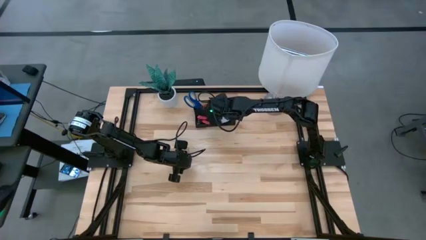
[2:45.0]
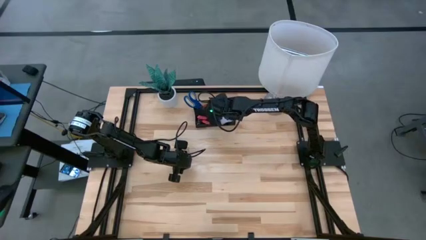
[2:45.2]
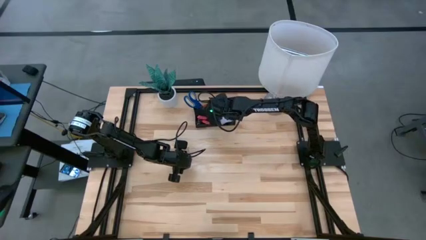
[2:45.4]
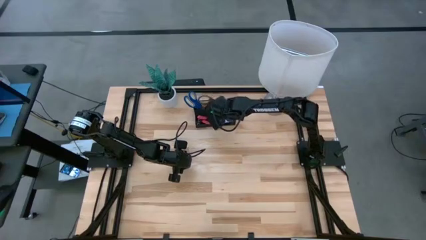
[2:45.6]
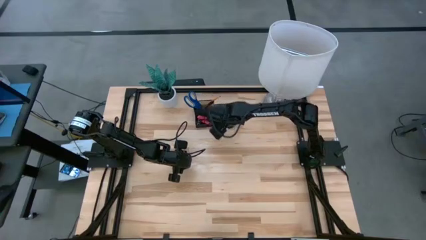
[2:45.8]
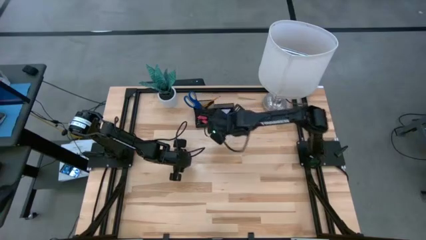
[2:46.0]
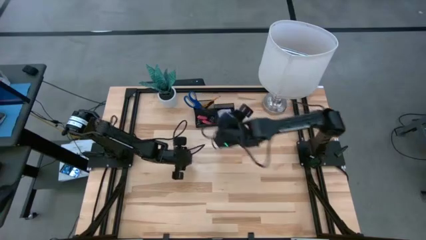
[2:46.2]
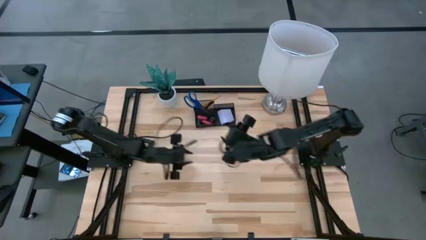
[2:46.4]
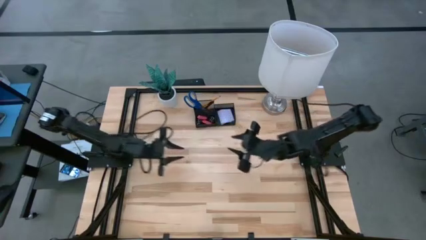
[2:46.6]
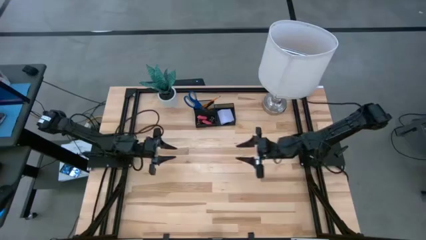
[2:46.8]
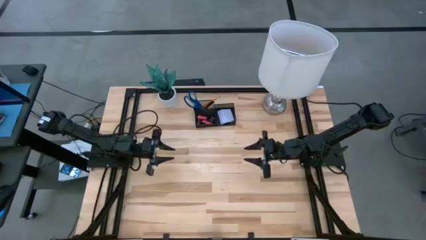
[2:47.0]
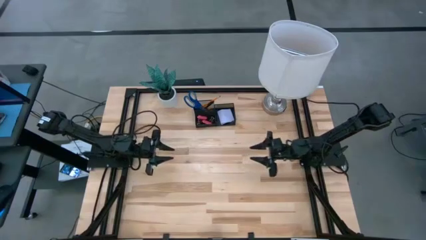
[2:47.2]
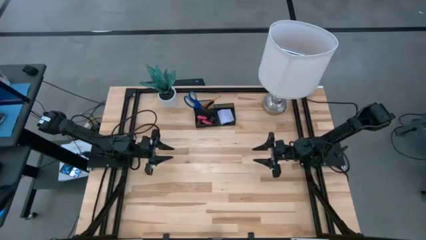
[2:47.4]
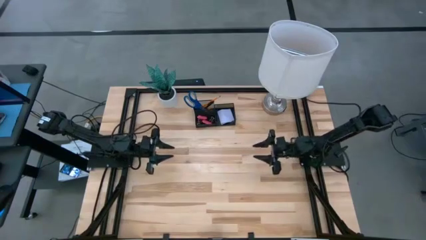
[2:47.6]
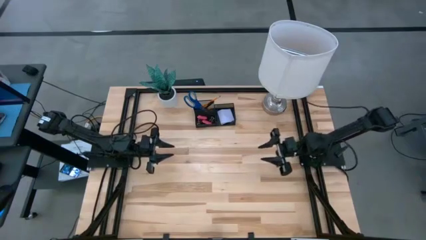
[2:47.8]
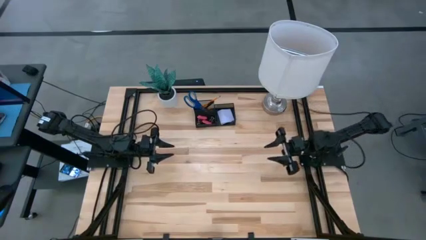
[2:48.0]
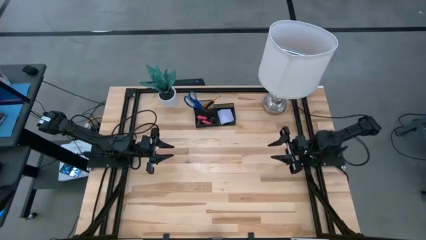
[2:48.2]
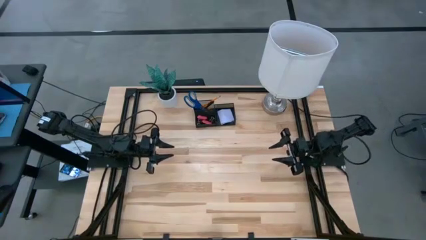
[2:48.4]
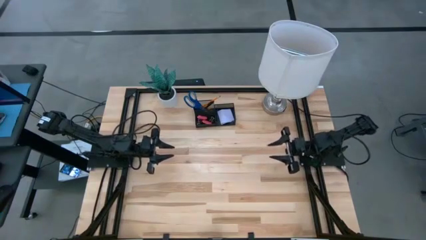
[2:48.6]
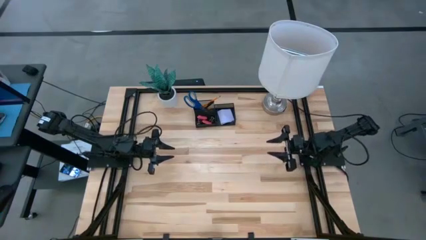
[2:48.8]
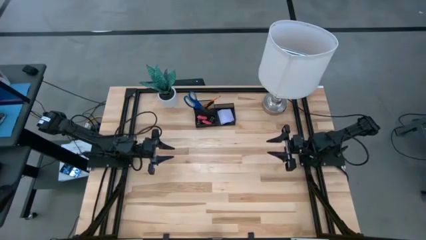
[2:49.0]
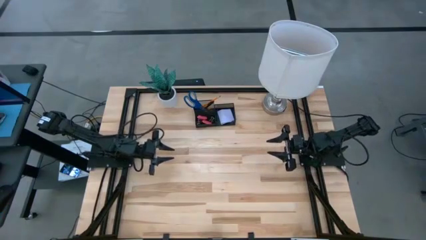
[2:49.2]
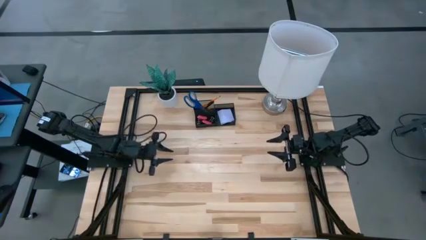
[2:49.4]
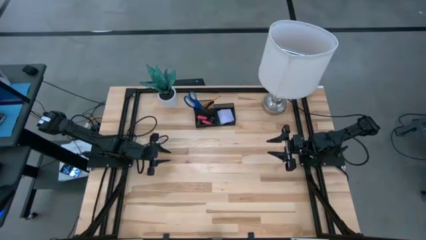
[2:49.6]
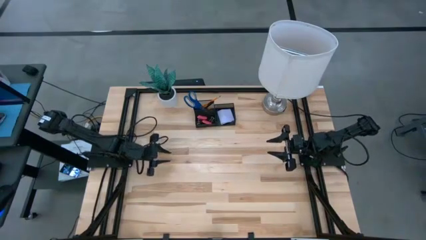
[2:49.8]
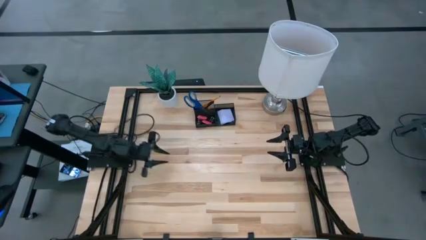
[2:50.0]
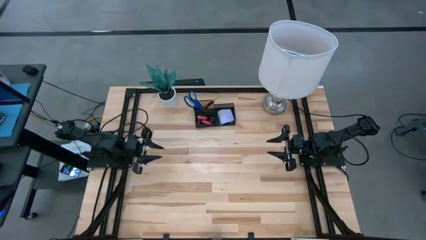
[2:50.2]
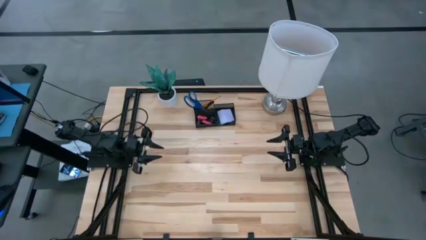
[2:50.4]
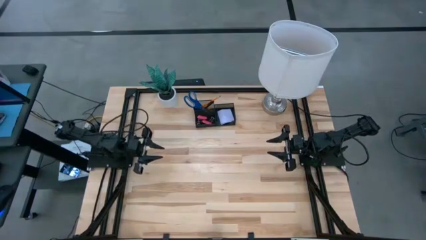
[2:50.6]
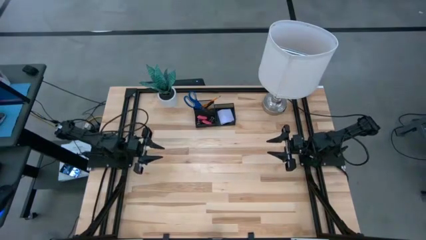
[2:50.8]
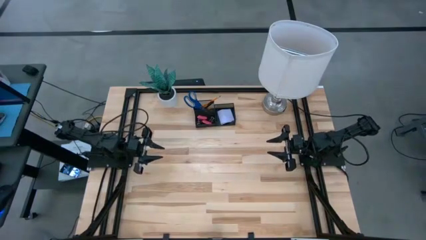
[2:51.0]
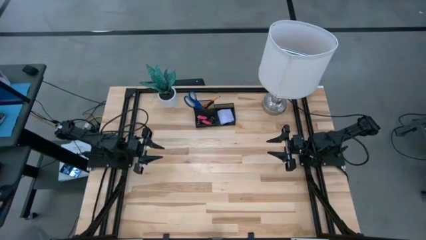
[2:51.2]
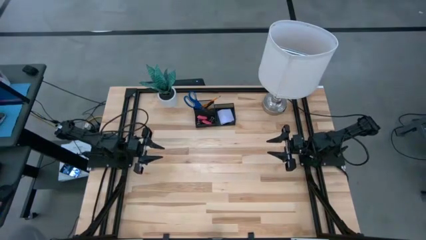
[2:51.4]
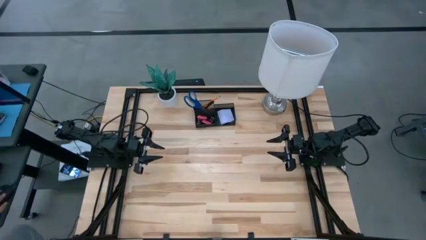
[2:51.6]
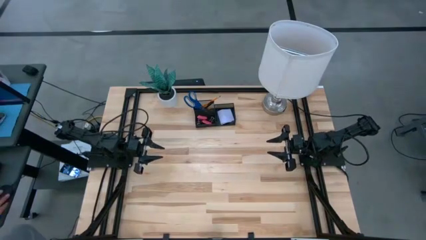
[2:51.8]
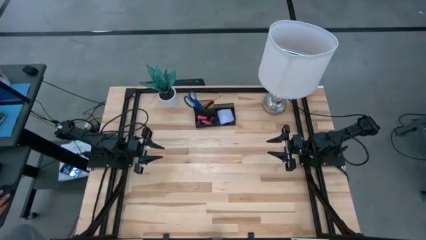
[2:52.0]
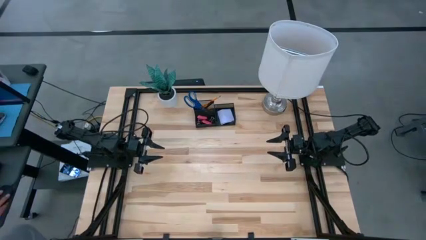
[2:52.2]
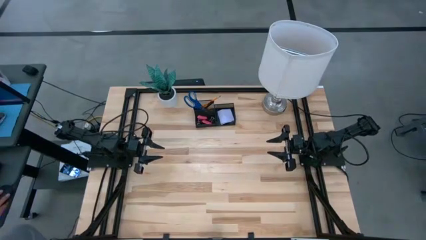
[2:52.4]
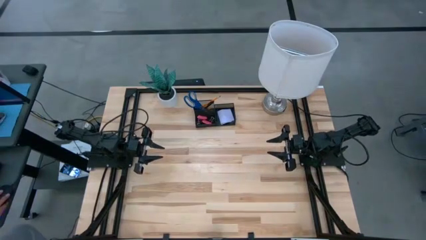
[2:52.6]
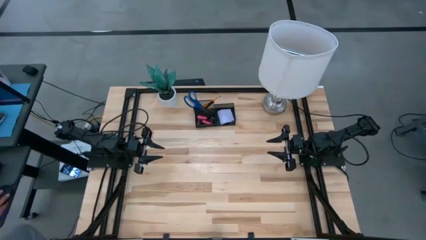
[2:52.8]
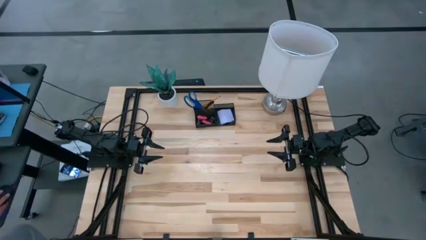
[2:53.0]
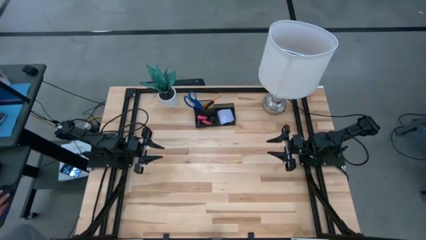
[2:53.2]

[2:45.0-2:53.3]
Task: Pick and place office supplies into organizer
Return to Home Position

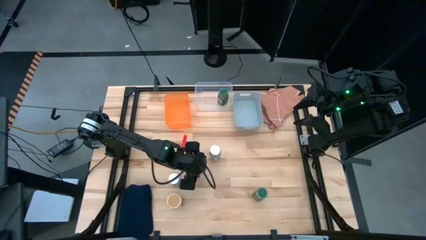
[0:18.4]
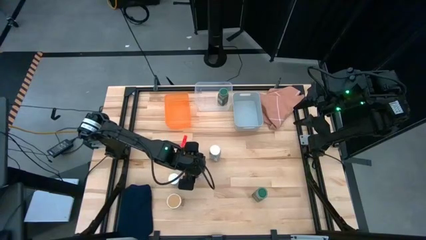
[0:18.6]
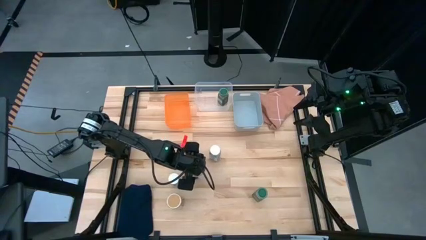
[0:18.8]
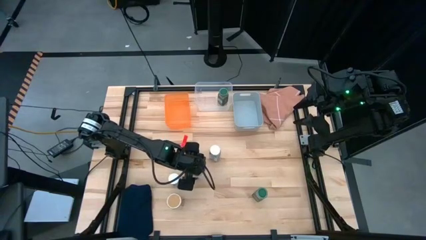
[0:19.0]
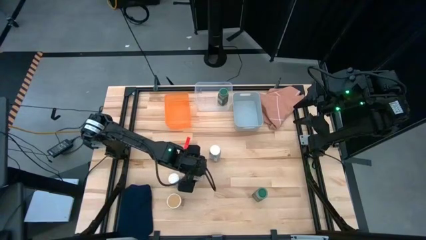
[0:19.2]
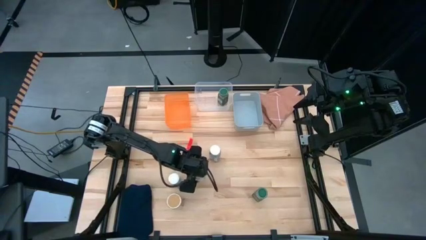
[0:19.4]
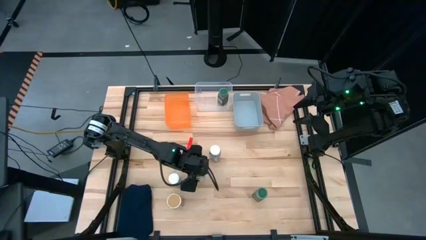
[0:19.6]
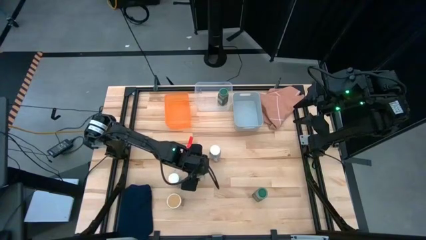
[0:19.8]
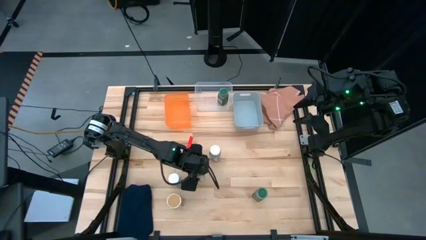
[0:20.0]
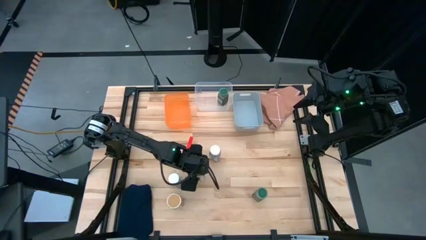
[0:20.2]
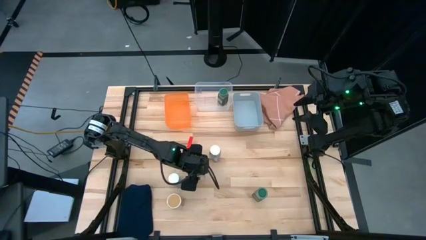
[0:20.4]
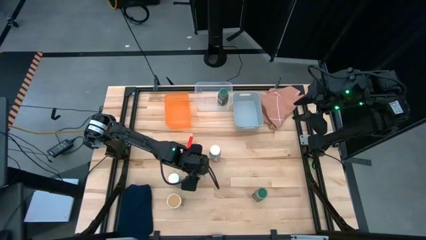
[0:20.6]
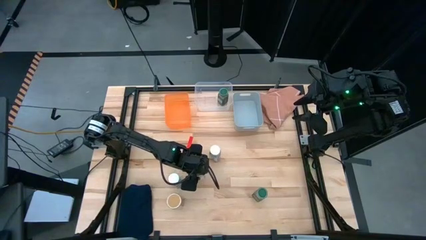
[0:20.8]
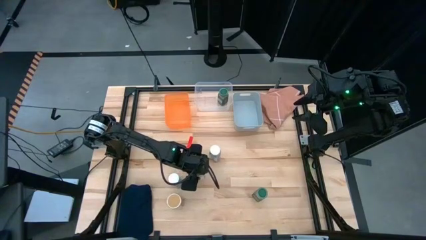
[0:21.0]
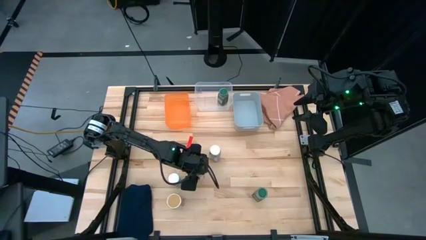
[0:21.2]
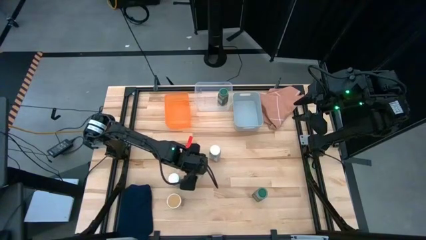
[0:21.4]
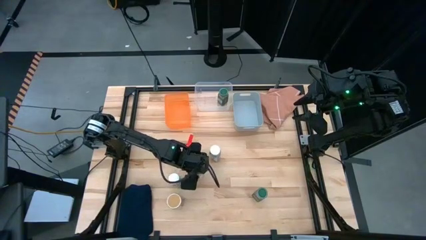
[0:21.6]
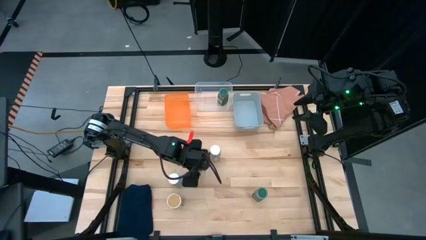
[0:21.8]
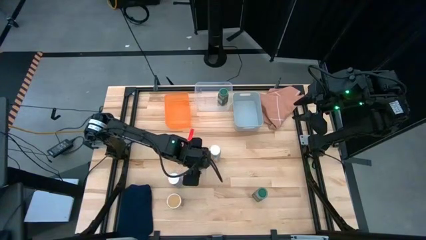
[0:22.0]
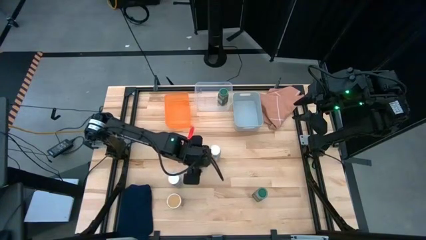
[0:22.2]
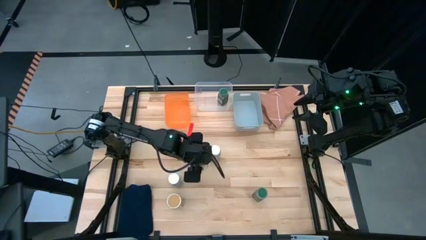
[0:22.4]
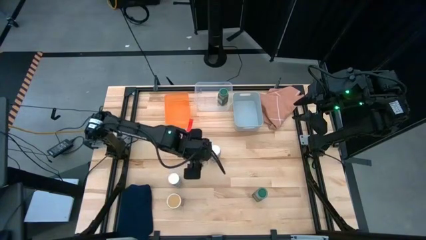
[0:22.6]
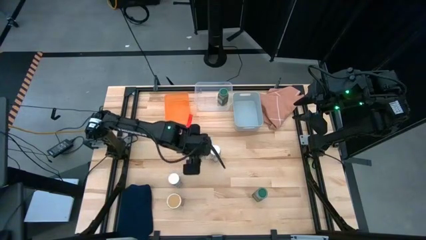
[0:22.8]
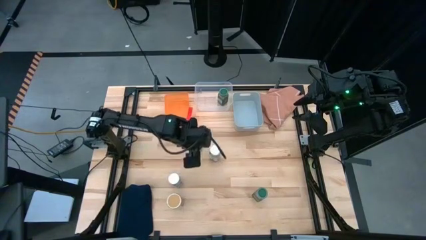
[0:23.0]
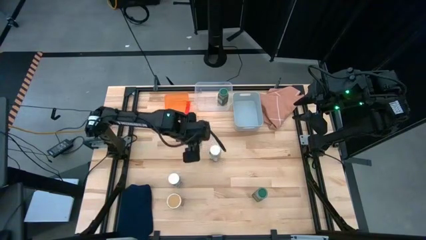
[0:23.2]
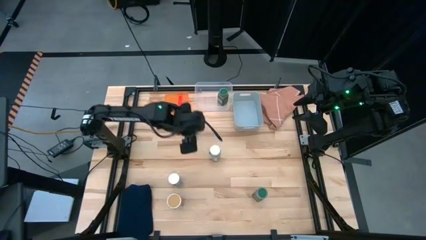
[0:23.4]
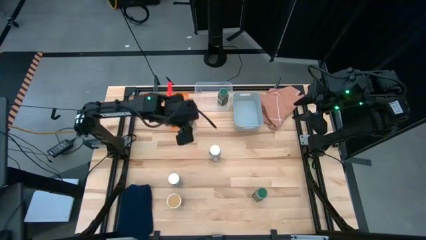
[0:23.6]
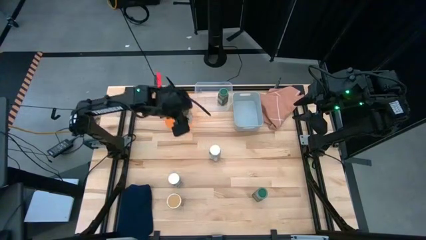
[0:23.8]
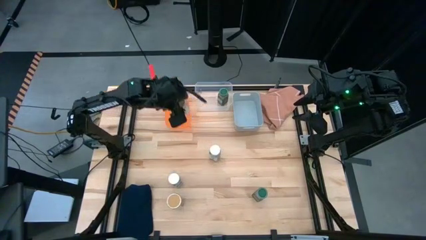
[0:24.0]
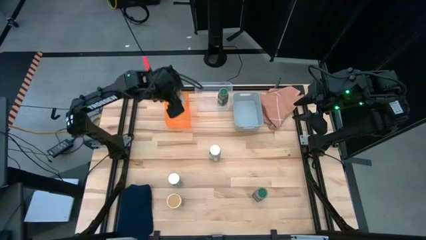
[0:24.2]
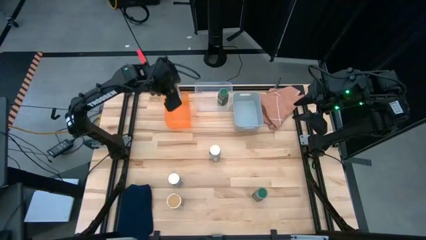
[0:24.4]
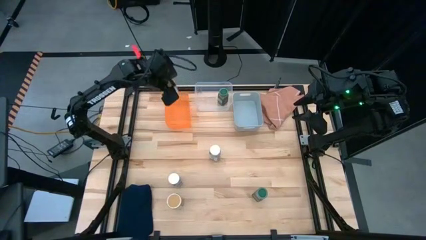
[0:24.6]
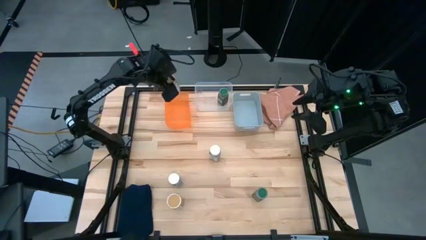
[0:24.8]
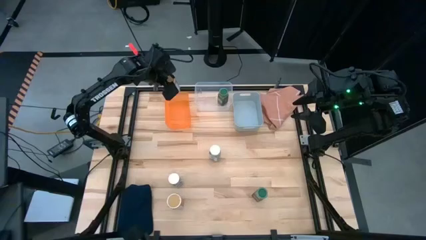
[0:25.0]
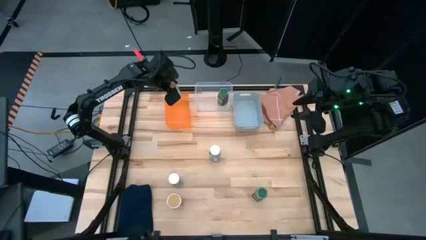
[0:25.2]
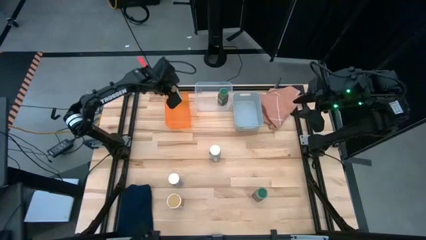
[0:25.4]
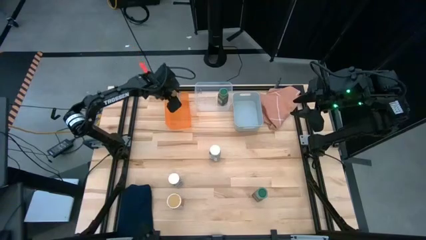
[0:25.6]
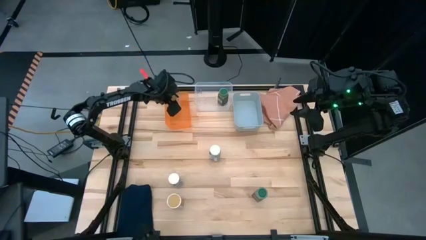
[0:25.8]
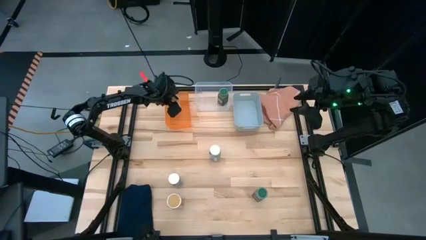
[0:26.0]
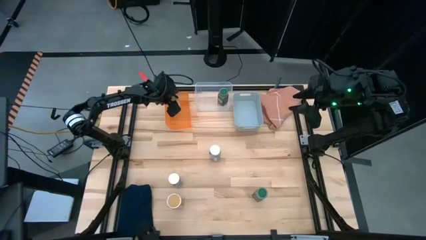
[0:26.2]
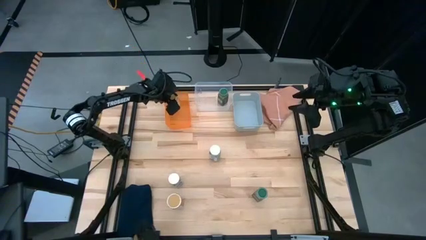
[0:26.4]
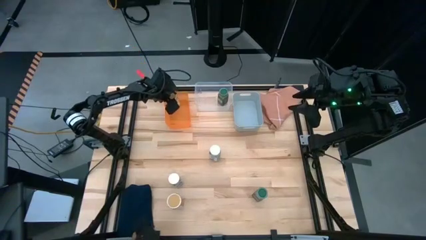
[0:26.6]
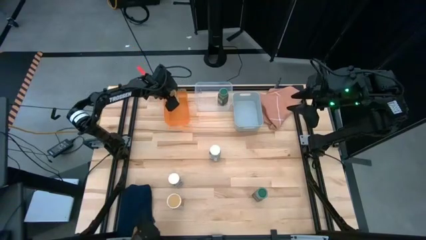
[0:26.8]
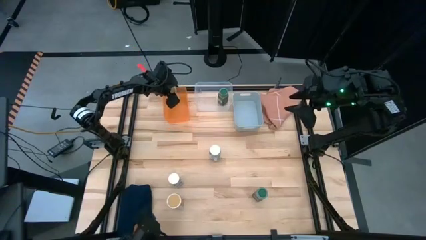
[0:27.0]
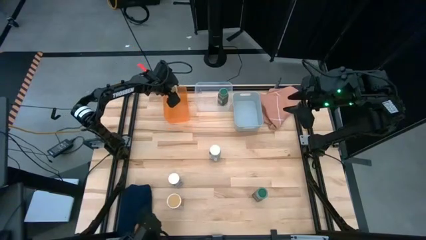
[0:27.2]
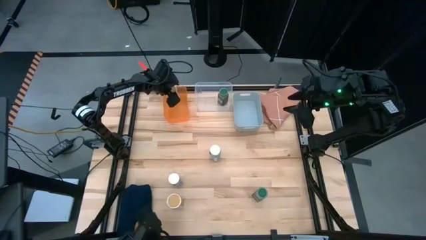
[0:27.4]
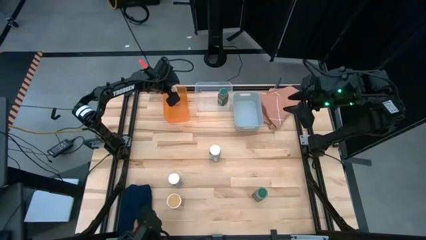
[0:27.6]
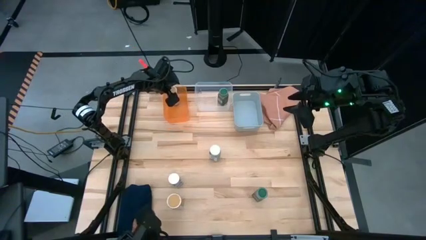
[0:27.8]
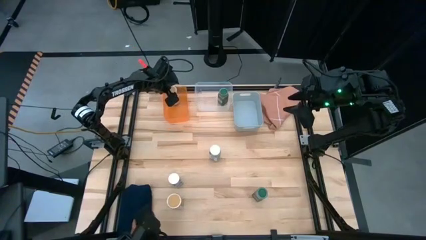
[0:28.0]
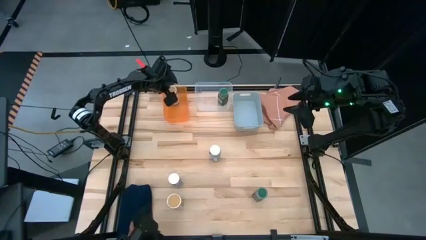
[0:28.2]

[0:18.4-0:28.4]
Task: Sort spices by type
Put the top gold seasoning bottle into the orange bin
